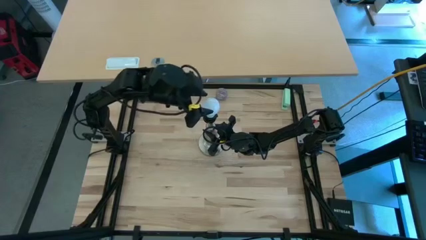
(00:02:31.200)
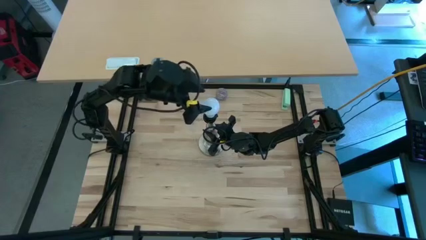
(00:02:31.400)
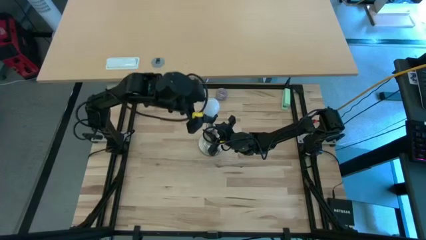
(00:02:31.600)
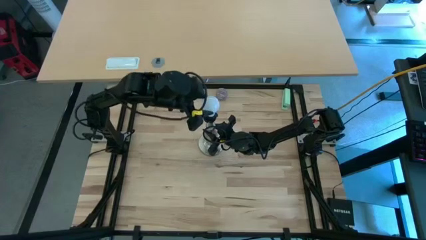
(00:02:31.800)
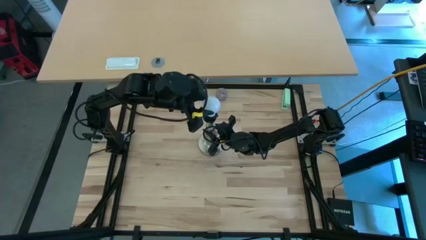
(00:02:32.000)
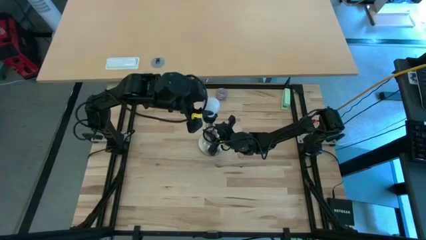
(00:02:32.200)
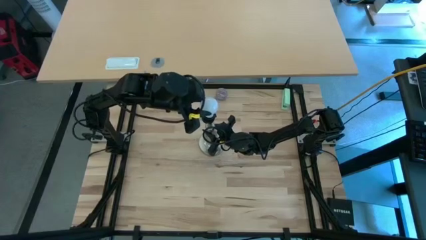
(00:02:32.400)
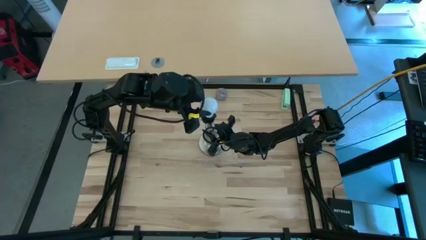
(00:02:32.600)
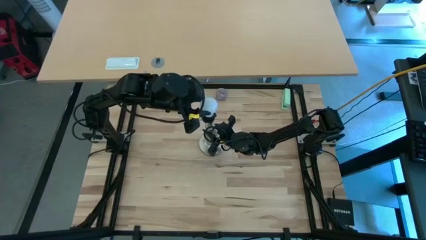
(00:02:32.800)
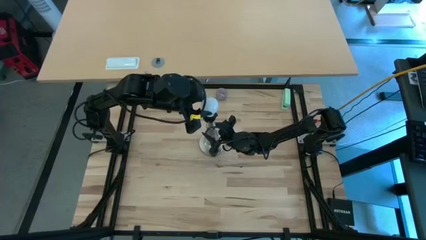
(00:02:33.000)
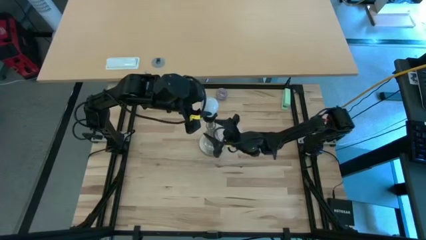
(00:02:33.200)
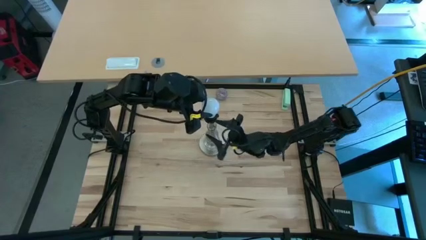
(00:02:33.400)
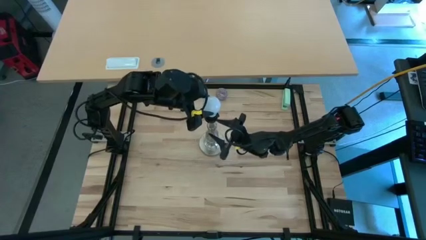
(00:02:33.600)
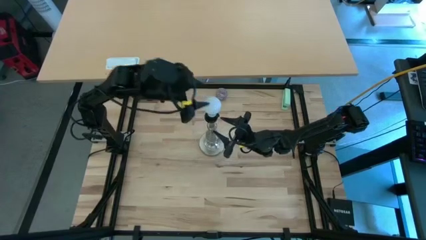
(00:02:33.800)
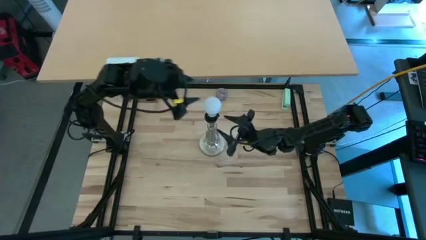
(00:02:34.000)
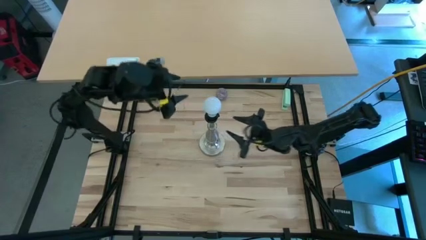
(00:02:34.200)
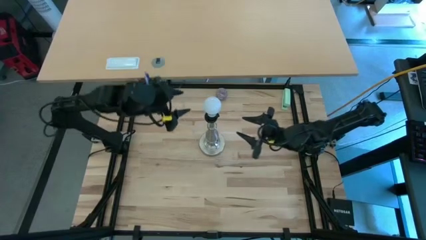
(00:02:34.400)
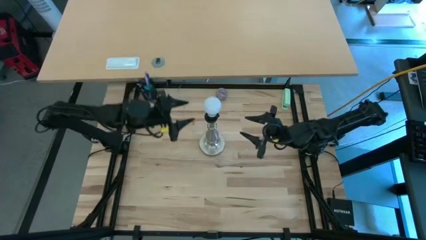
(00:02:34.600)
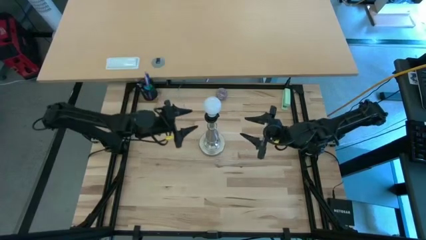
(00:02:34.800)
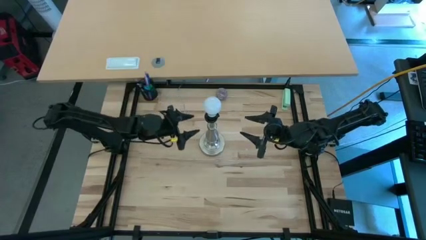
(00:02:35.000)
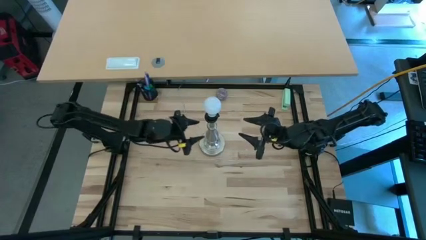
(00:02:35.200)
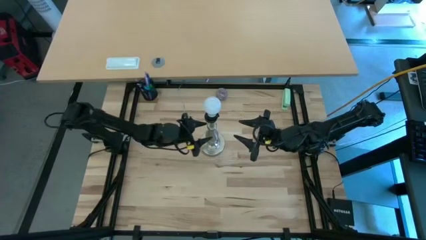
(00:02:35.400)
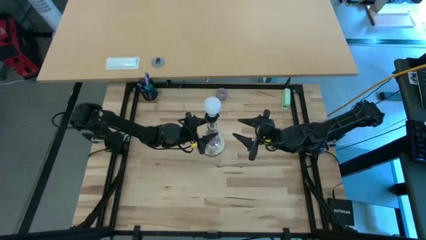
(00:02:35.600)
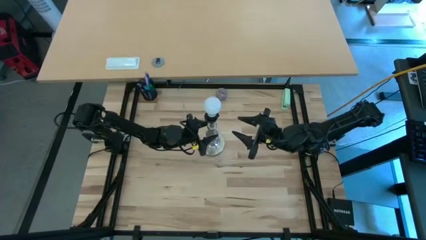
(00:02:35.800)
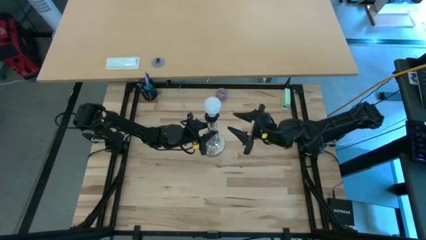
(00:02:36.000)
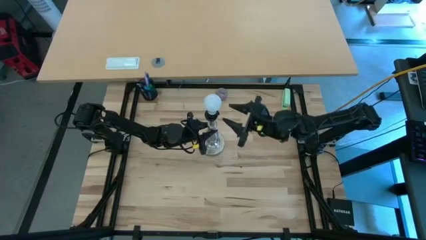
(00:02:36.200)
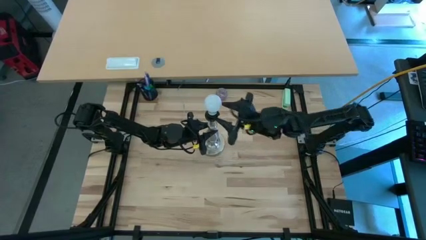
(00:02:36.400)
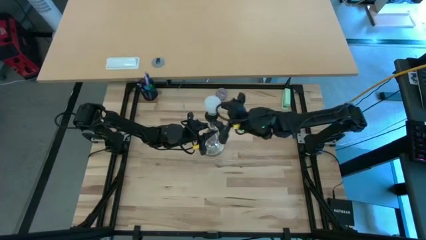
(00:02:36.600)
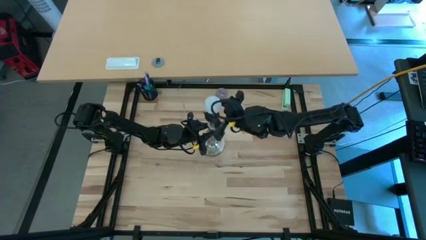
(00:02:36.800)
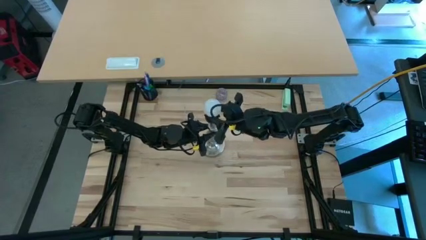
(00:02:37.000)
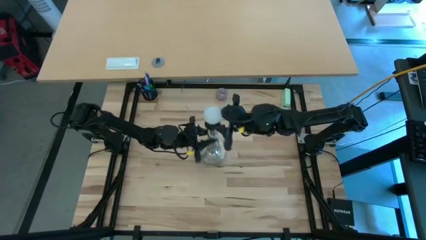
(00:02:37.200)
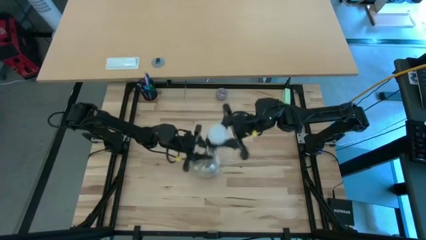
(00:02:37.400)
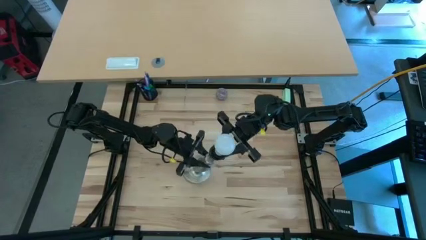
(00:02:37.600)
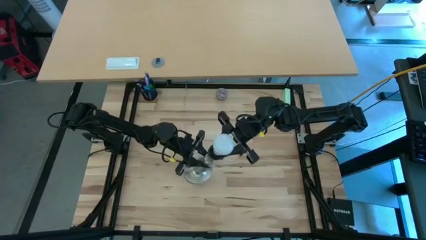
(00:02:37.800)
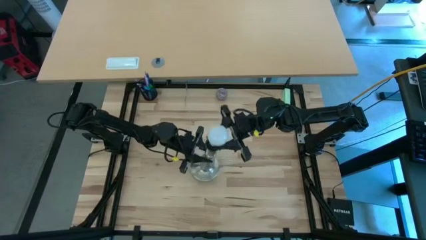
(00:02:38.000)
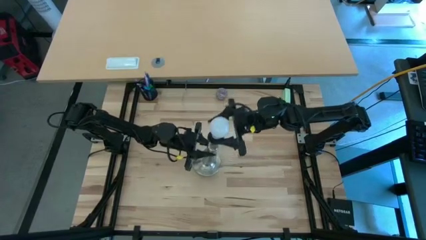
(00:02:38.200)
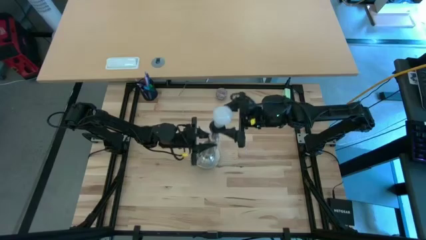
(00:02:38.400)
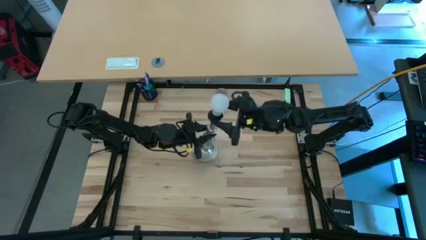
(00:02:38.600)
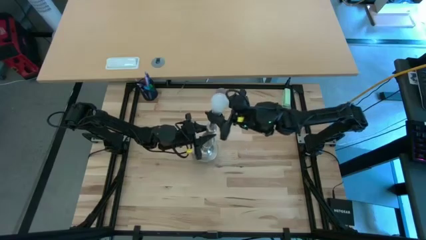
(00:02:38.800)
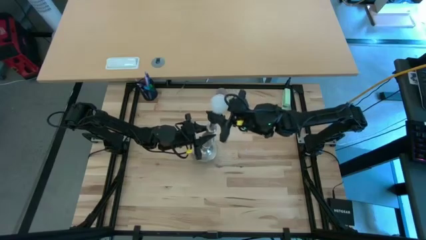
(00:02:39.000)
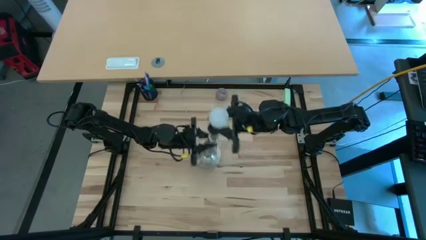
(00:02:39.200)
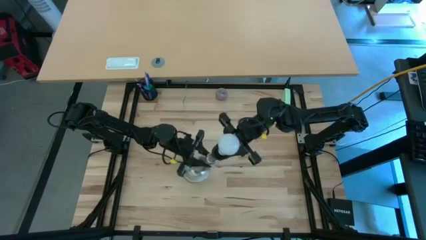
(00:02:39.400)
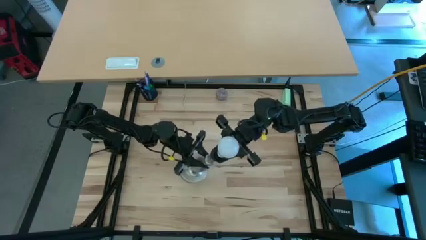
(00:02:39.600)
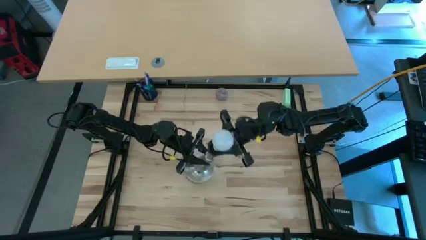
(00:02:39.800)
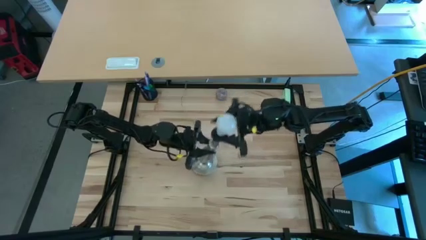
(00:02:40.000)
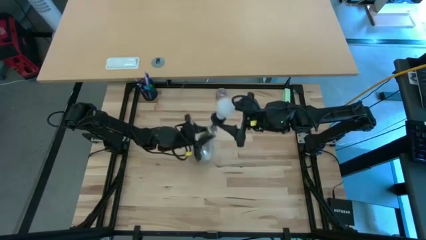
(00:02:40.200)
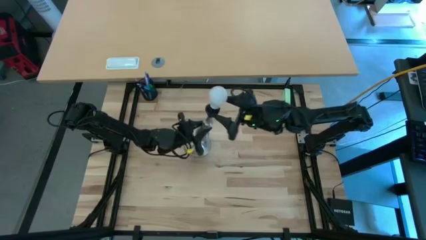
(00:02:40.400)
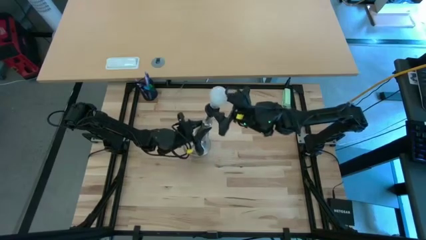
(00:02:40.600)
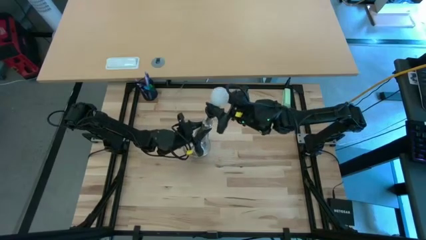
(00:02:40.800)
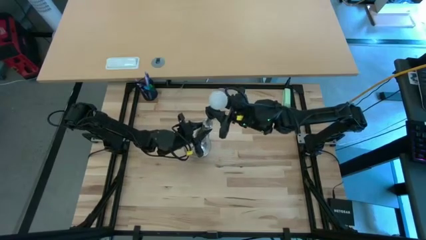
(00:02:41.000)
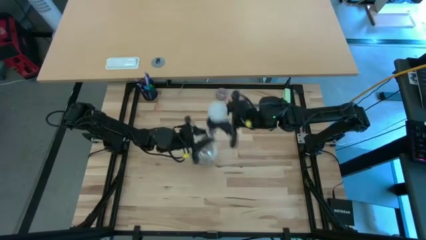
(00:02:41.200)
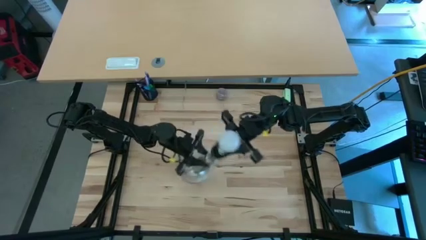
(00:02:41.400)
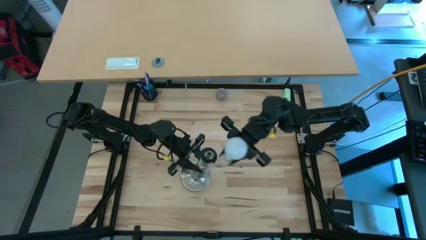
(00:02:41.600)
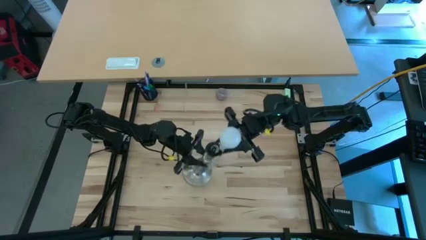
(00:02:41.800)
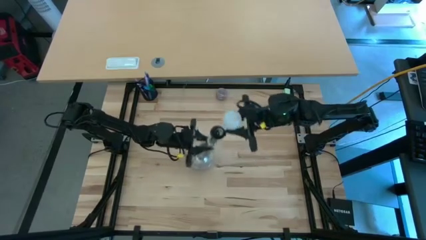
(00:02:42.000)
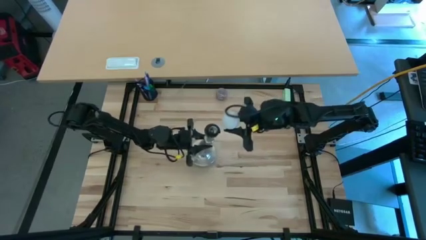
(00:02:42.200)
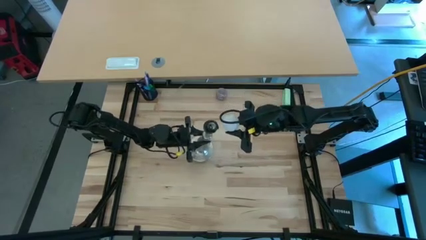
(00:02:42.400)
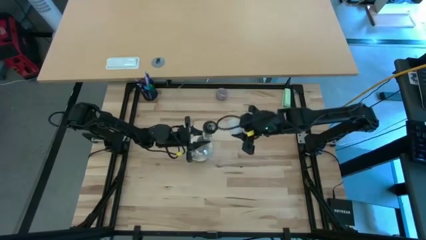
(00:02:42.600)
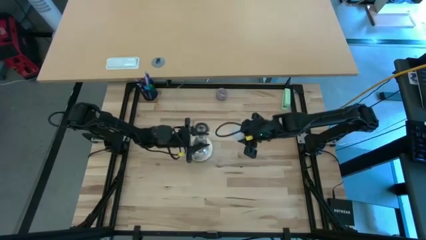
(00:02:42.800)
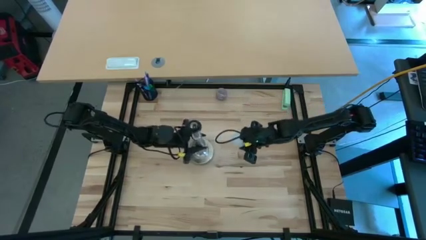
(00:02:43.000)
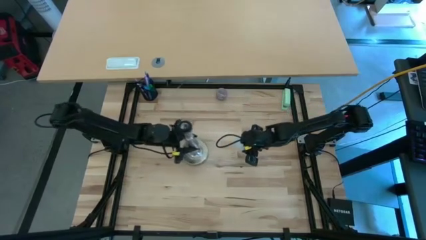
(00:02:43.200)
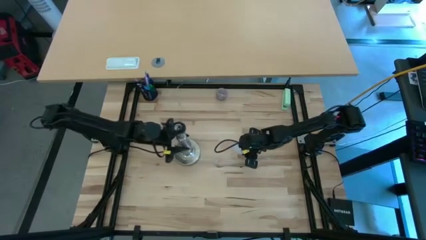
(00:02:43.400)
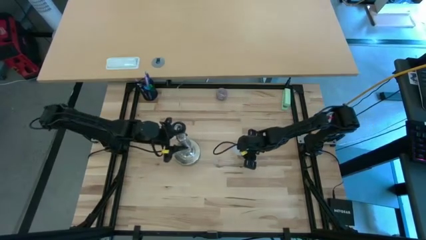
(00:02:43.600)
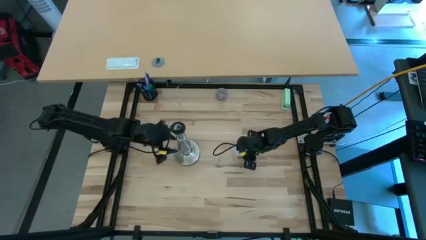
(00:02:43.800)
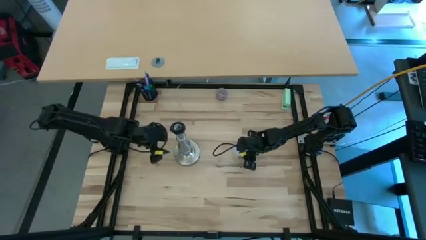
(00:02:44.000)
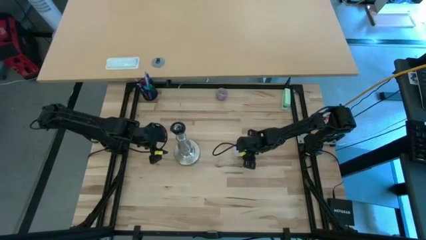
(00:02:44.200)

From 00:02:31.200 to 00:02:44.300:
Task: Screw lightbulb
Remove the lightbulb from the silver lamp

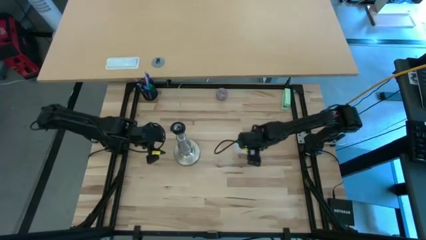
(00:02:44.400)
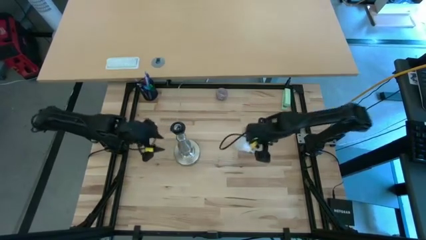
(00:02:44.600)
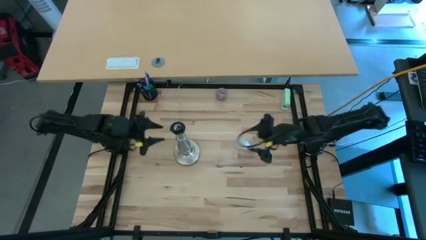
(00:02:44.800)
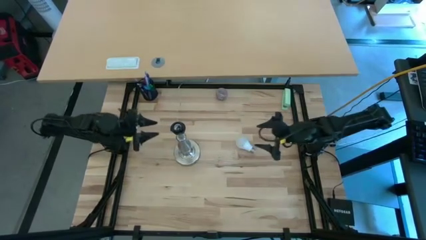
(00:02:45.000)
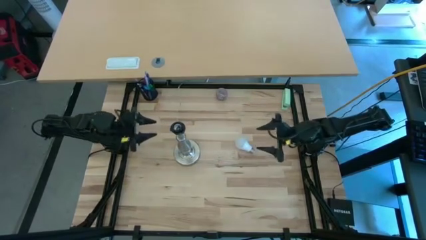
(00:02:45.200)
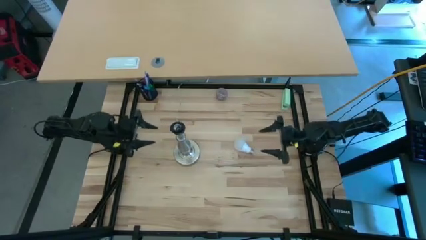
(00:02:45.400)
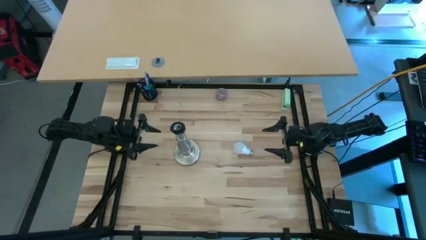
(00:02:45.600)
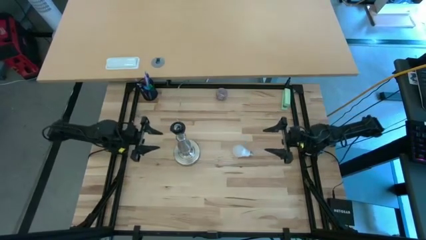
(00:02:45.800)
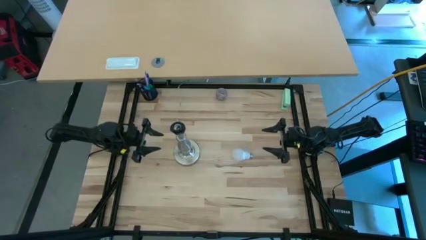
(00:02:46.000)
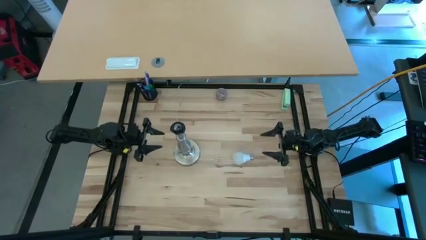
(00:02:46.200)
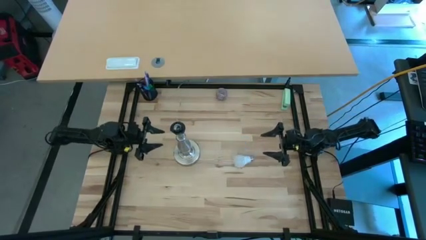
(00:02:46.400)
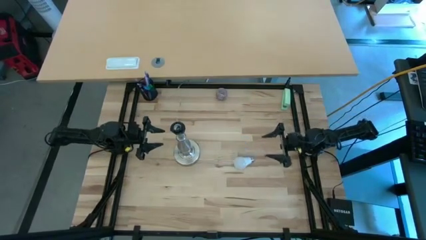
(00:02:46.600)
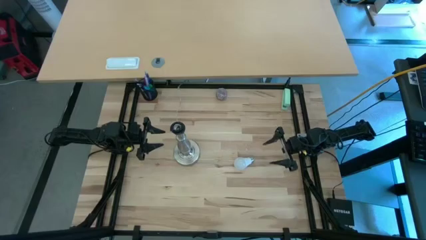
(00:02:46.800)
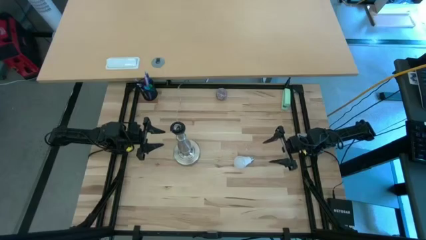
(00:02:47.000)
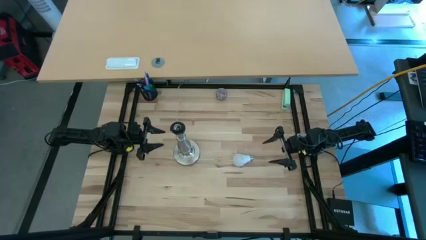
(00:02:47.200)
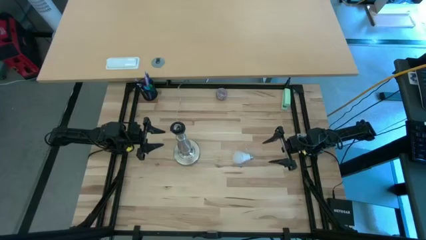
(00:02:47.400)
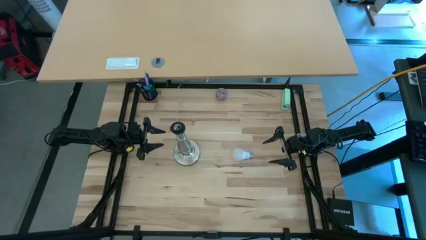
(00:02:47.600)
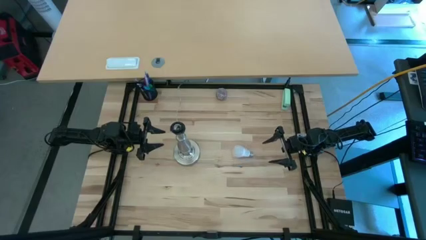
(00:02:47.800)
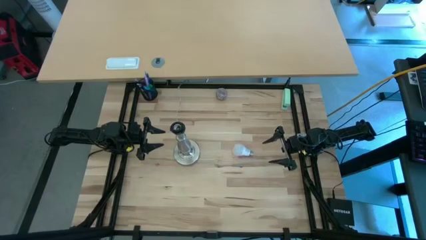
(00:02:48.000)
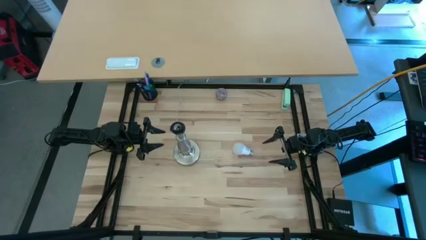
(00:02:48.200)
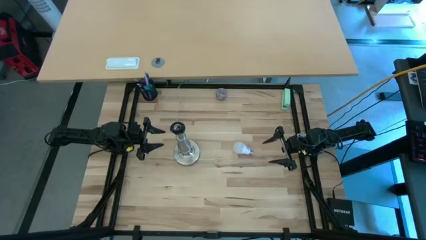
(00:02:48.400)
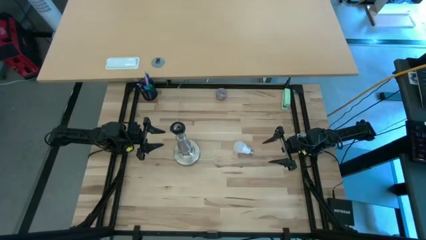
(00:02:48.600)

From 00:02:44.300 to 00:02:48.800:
Return to Home Position
